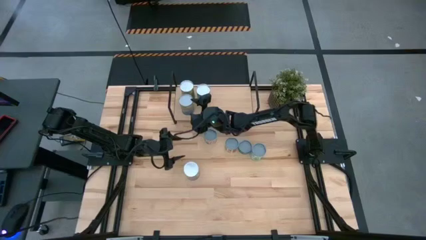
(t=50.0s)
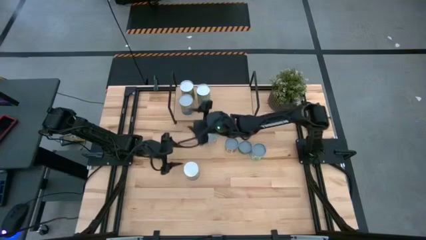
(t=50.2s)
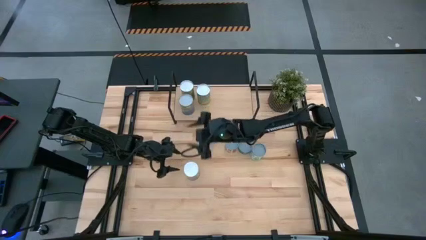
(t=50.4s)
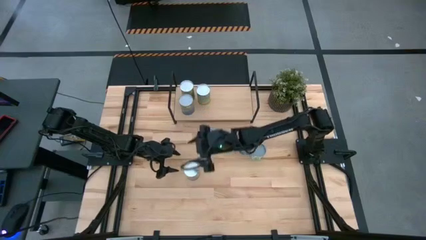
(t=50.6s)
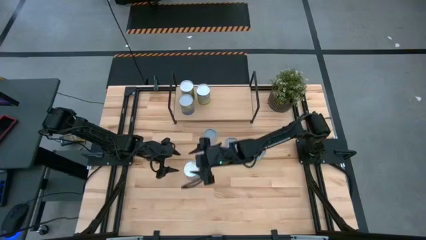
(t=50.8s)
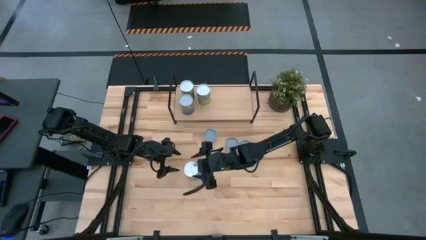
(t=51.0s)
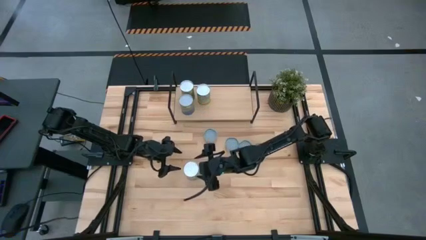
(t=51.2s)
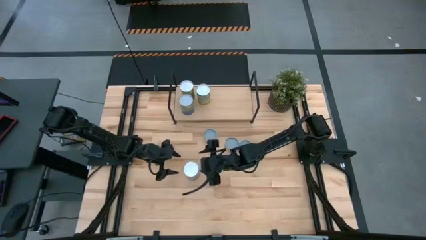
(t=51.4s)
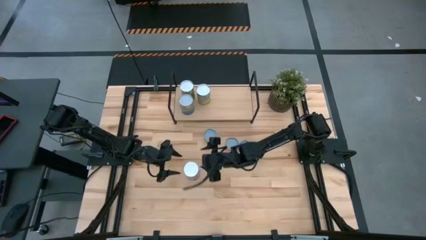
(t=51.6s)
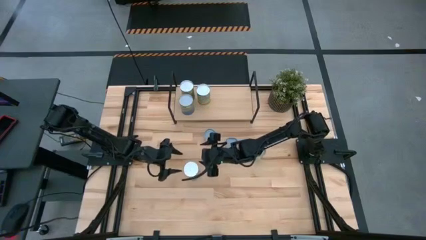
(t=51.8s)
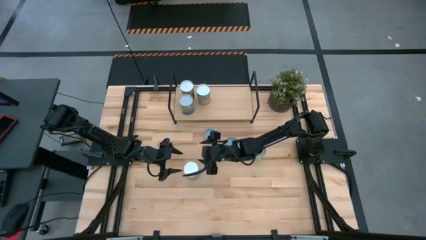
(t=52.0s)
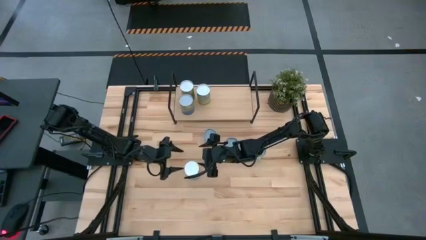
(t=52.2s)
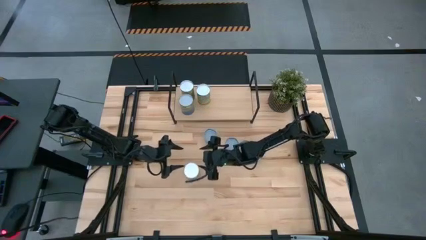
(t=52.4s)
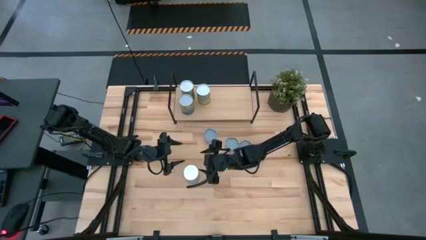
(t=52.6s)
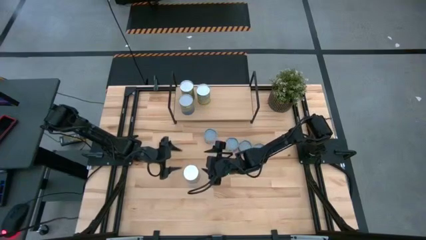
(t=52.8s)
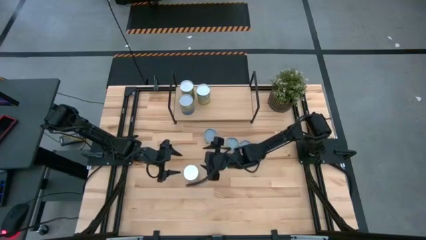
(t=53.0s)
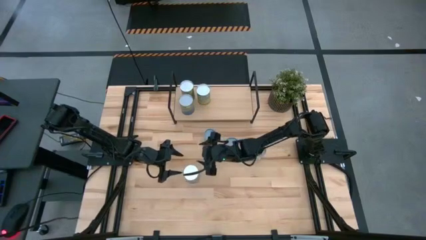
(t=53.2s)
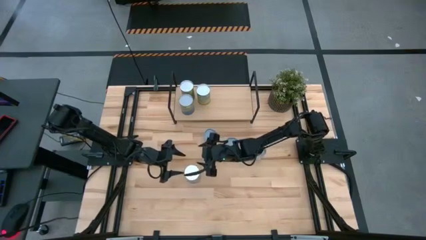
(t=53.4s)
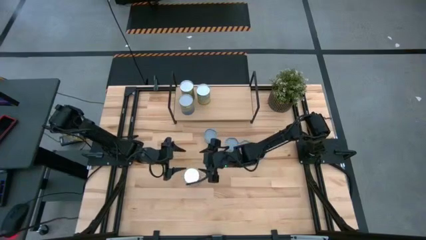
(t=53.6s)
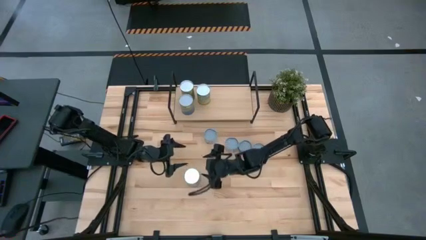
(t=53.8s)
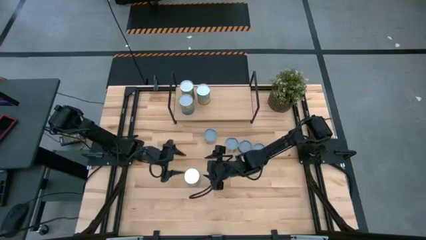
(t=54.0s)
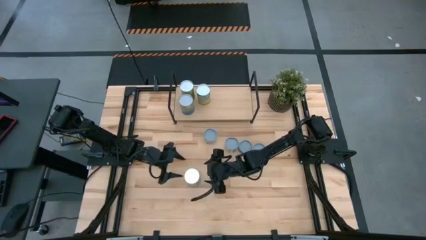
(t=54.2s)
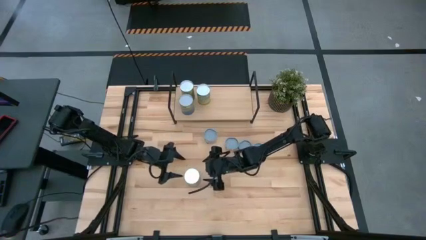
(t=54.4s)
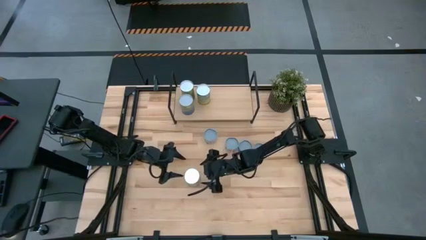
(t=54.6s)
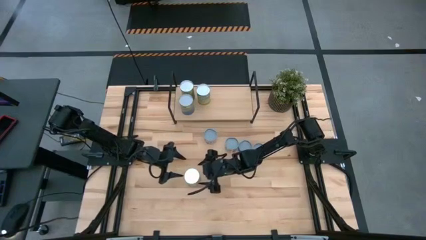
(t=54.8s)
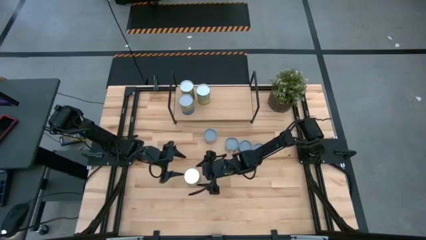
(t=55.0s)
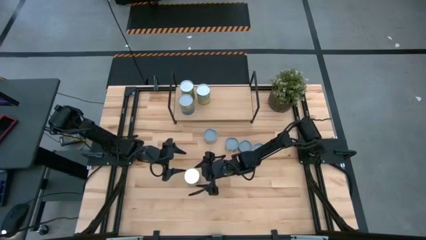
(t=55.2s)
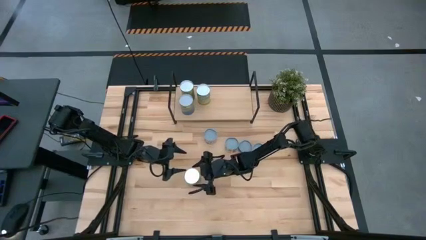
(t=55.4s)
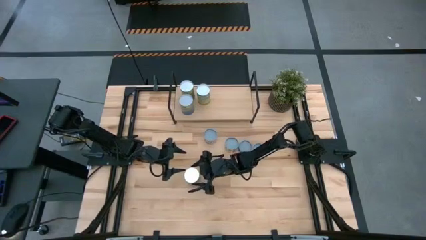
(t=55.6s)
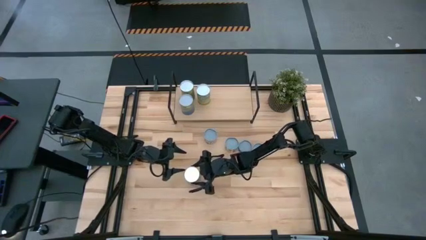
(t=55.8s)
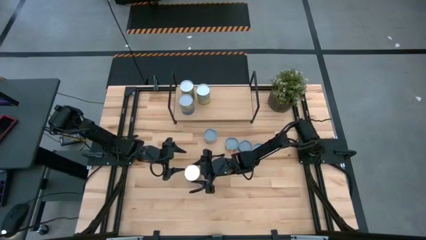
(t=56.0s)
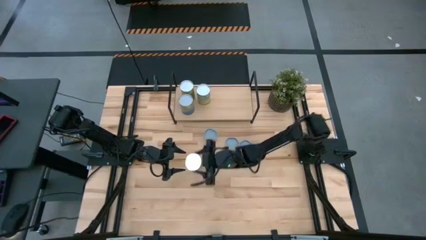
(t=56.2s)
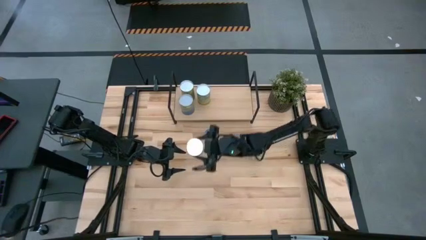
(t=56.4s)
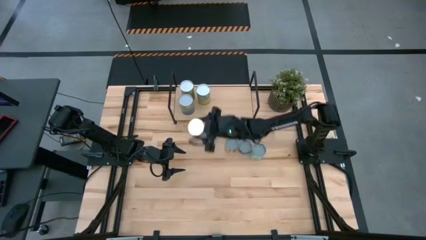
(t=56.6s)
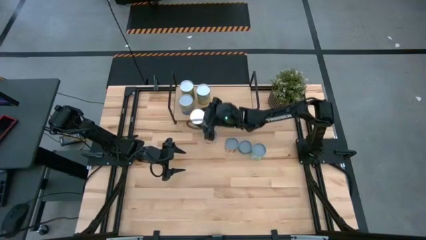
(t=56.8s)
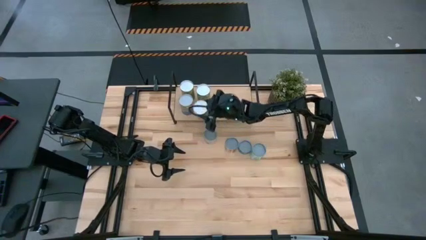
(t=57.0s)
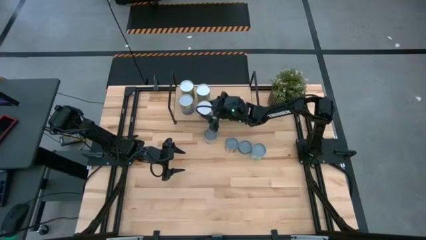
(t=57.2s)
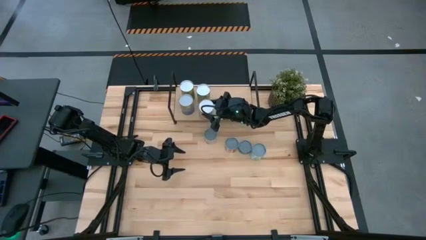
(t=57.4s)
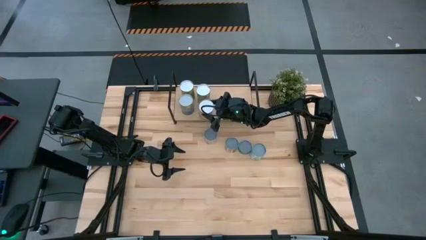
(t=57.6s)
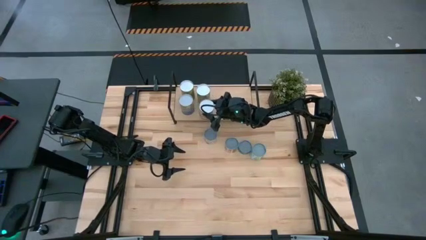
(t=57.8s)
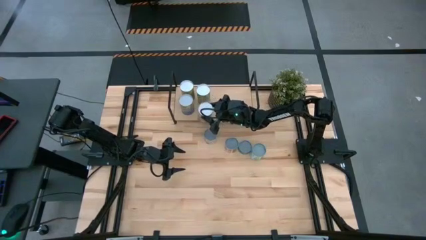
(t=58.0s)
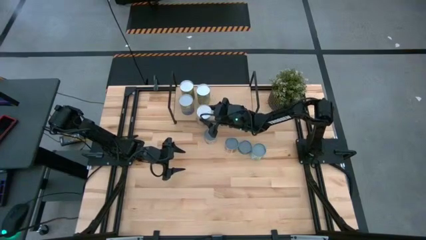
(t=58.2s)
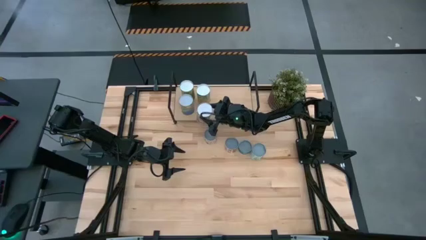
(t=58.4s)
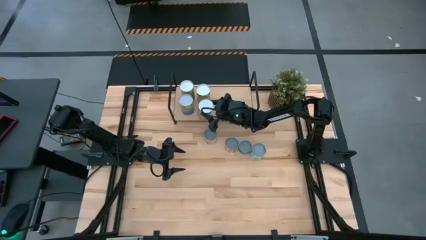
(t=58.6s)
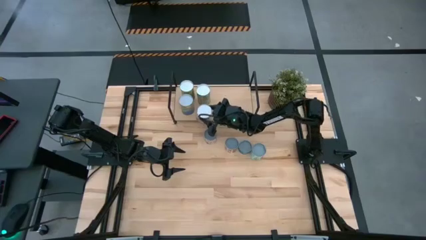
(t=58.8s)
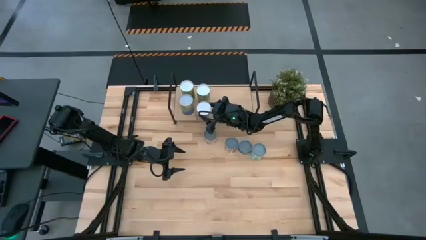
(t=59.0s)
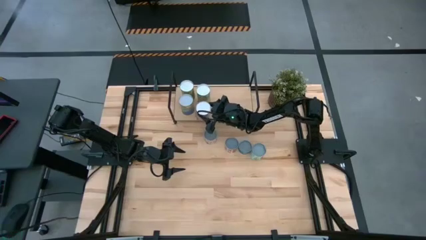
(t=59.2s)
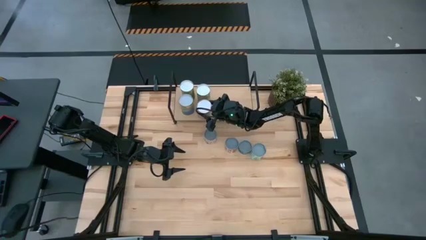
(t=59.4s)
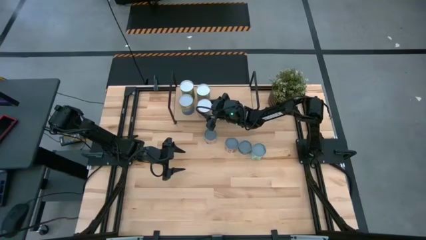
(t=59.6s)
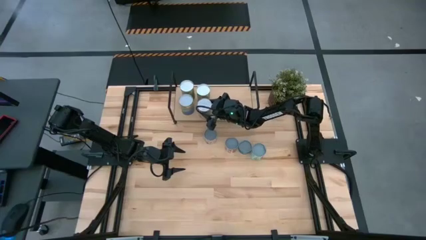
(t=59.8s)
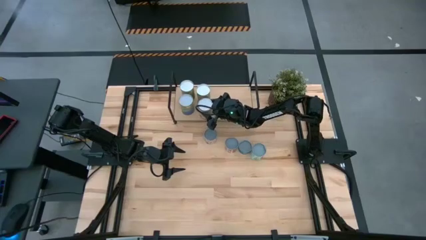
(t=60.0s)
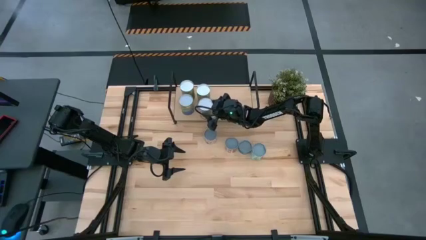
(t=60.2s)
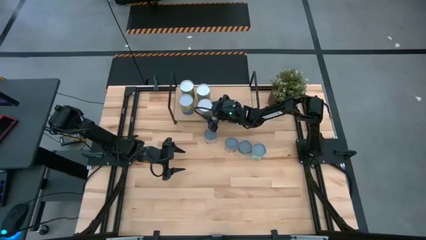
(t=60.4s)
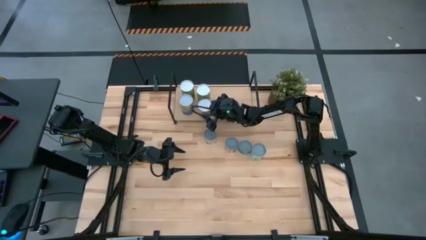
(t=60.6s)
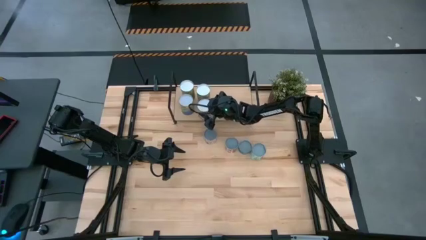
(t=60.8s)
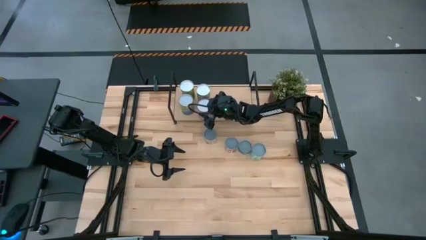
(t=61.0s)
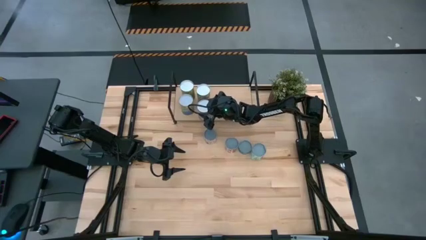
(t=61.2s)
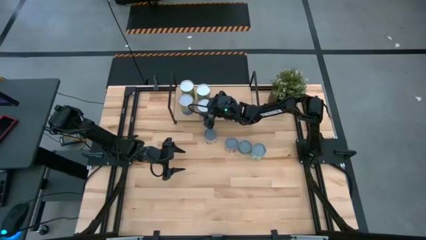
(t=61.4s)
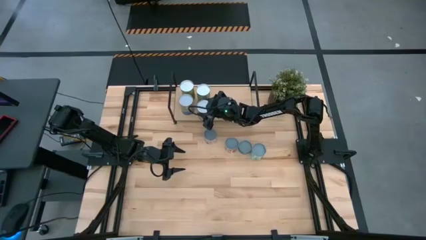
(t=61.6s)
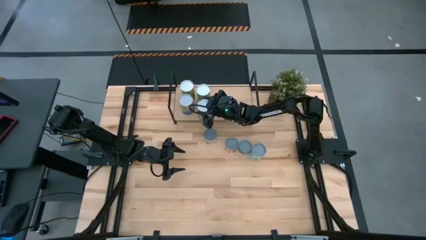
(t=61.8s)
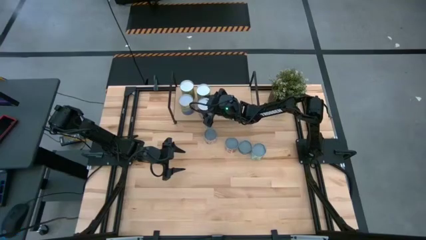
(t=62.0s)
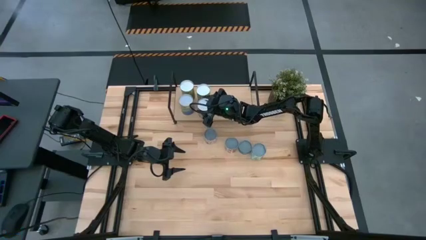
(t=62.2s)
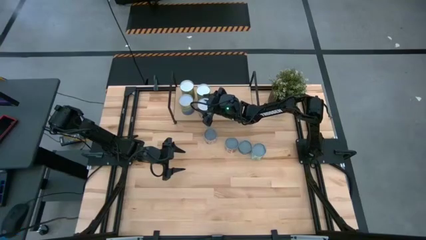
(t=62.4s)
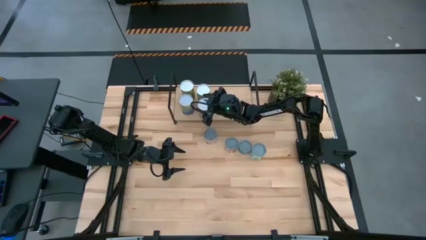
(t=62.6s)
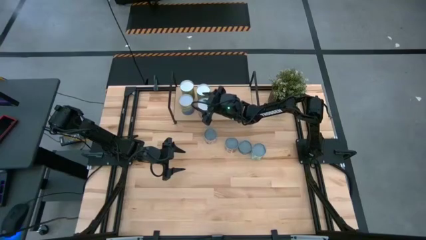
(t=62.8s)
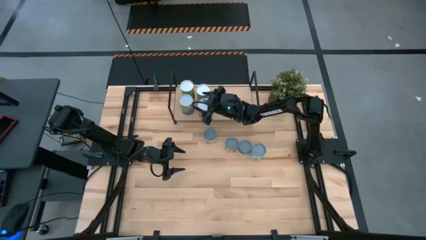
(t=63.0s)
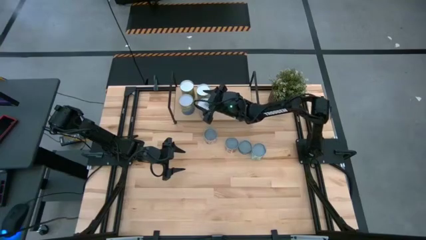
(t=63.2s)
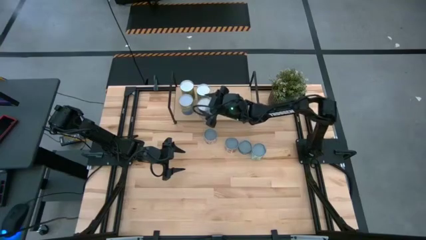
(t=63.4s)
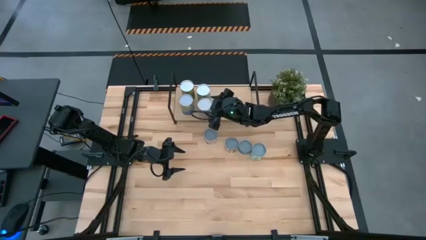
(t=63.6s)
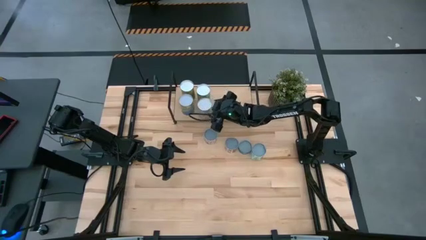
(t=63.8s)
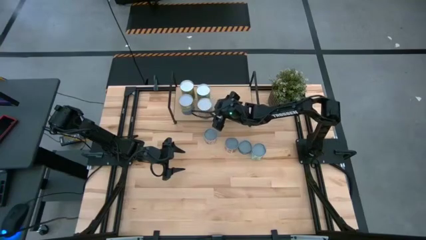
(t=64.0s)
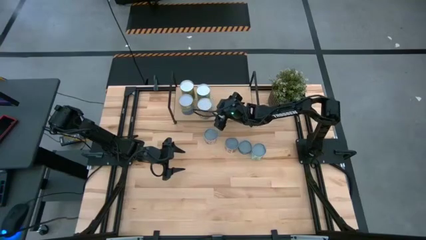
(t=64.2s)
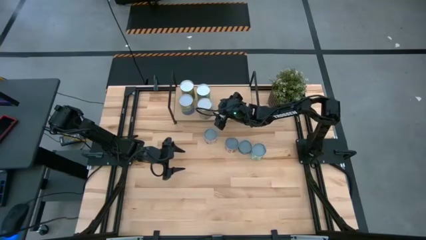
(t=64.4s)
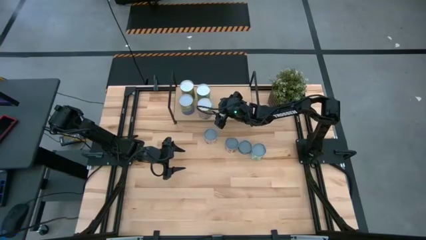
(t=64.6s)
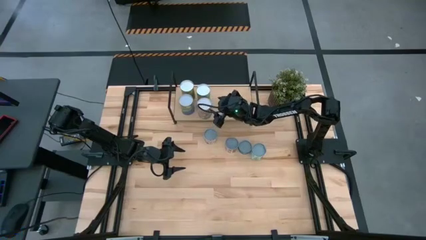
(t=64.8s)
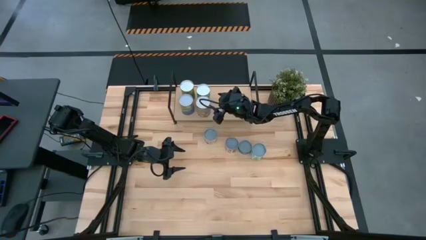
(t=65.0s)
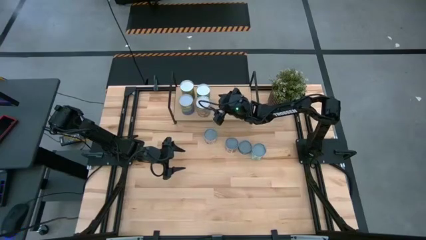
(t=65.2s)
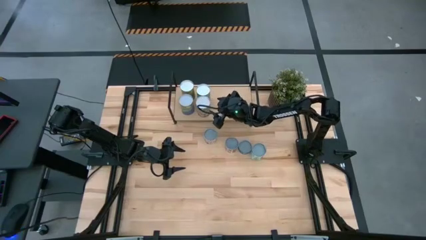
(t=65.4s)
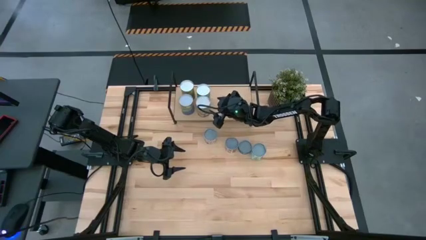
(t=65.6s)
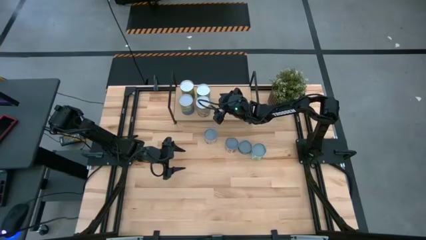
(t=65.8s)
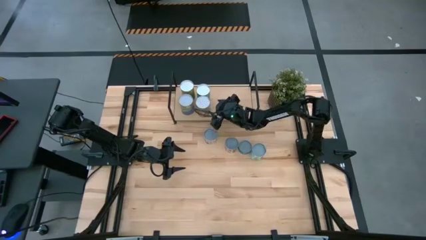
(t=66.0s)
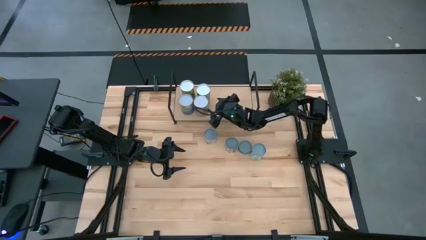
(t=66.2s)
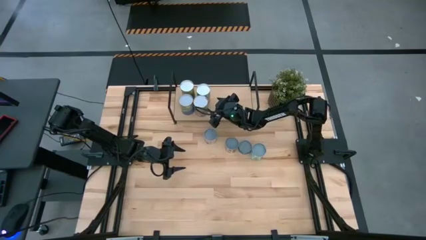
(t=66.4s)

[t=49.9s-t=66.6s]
Task: Pick and place cans onto a shelf
Put the canned peaches on the shelf

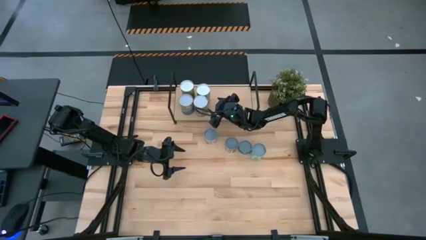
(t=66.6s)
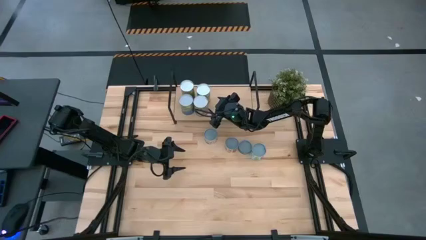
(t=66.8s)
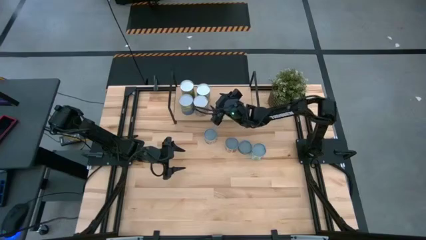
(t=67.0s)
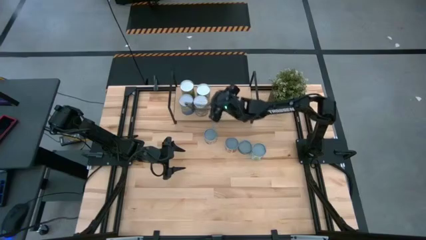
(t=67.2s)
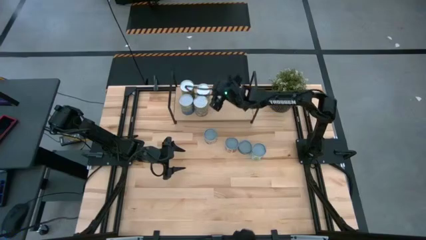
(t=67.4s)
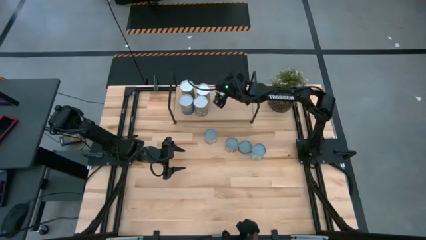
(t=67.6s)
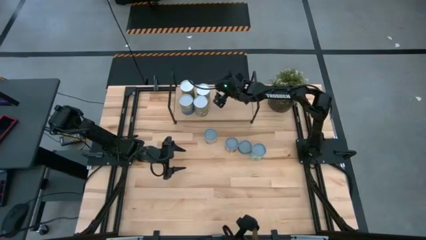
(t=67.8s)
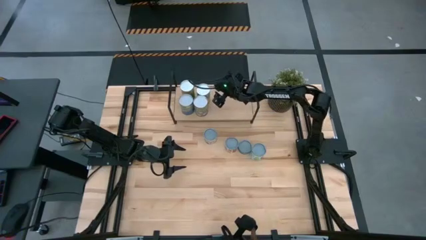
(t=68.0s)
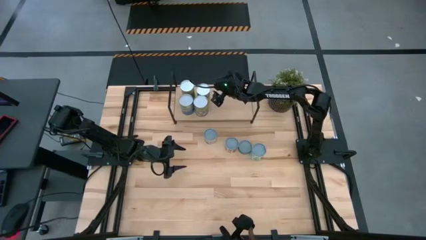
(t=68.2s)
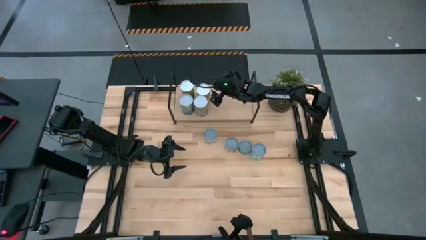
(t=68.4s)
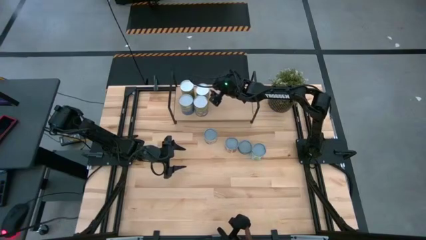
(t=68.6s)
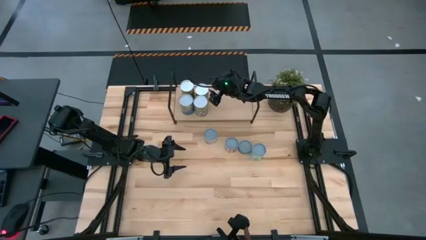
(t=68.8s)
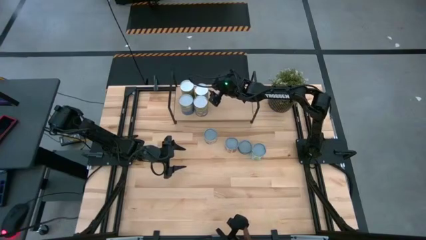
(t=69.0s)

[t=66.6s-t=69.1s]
Adjust the canned carrots on the shelf
